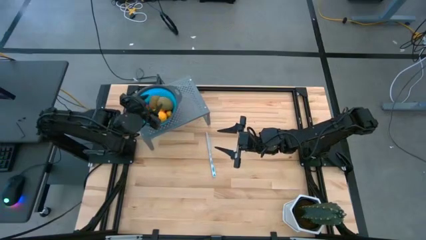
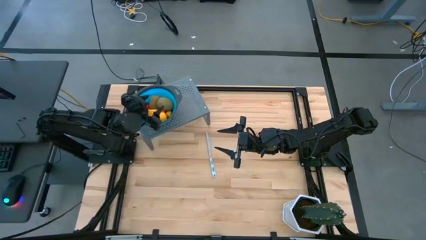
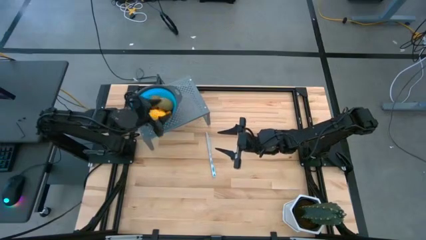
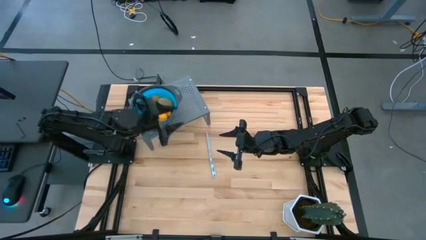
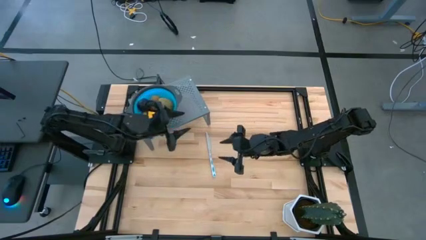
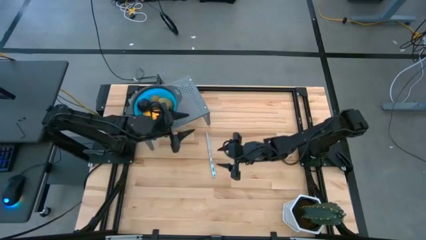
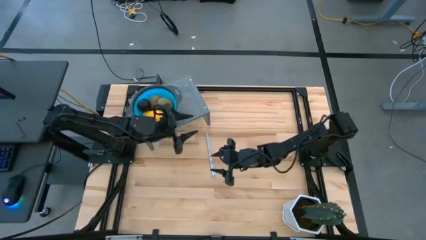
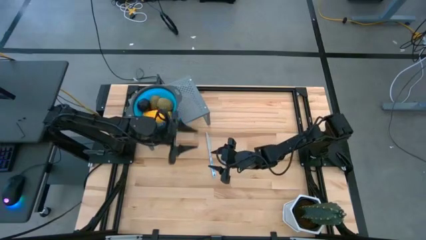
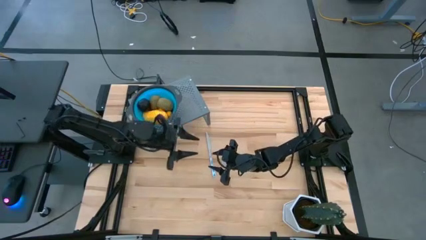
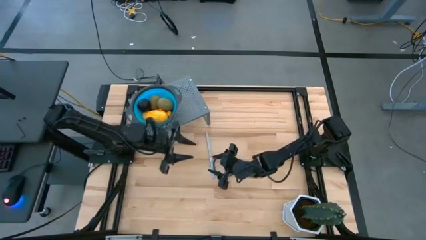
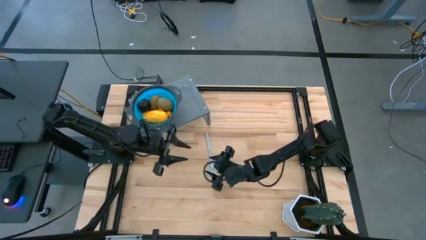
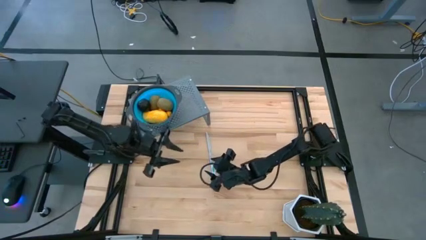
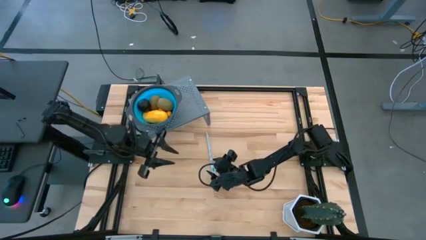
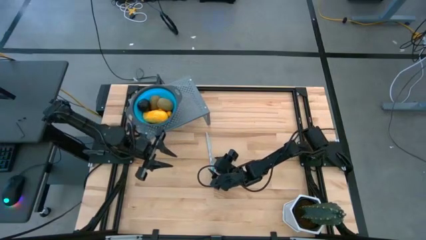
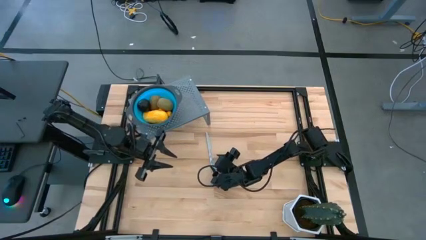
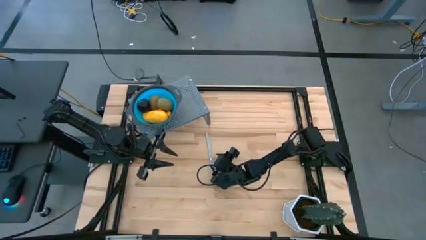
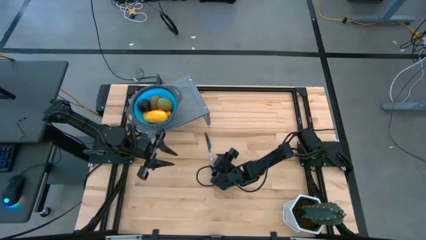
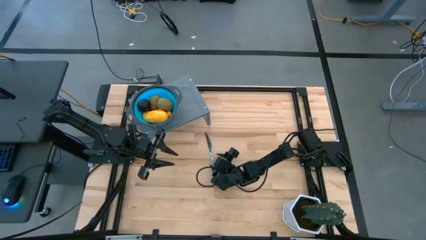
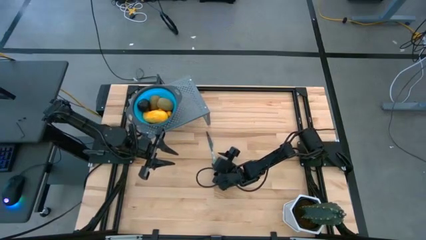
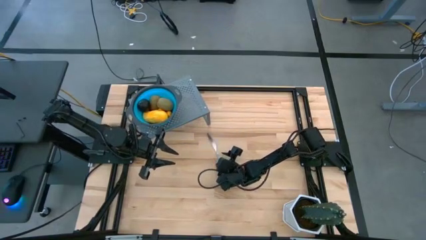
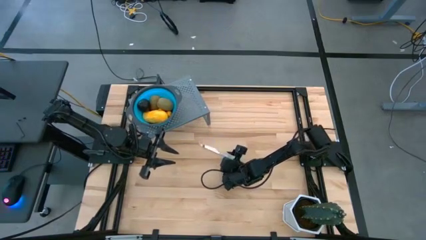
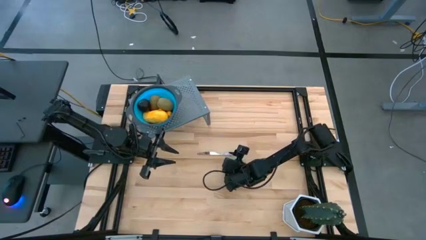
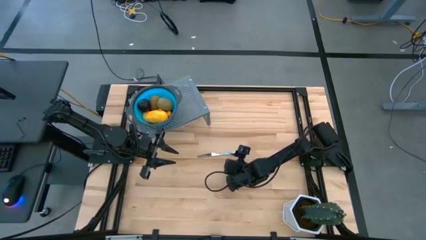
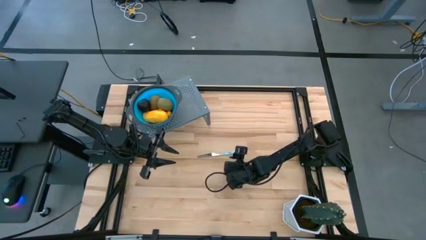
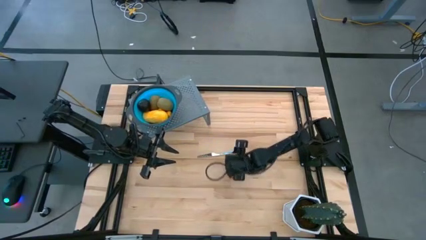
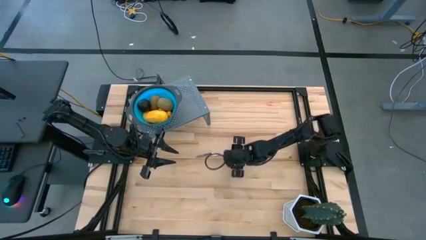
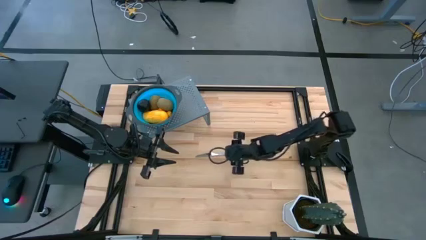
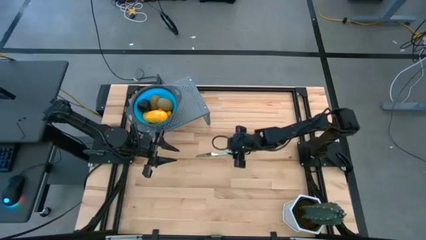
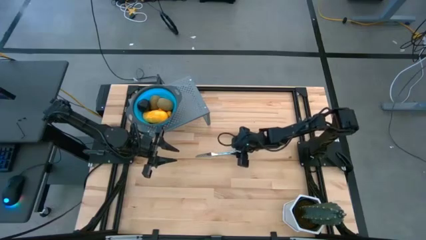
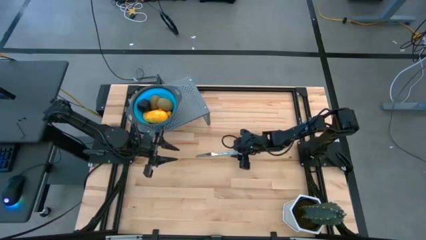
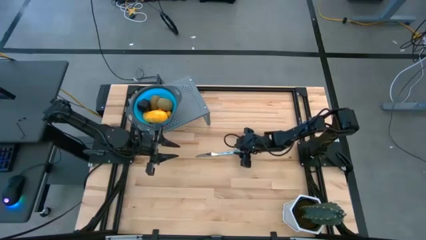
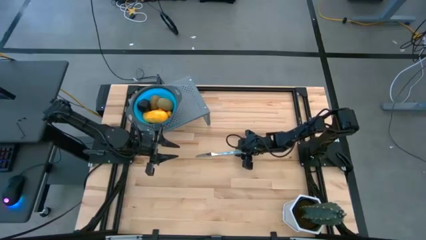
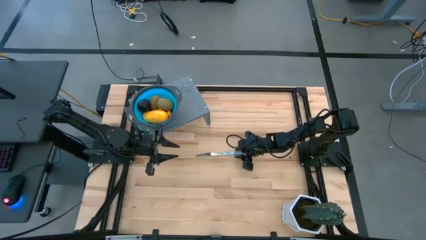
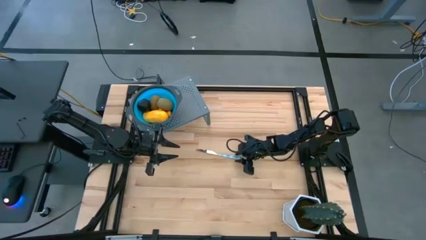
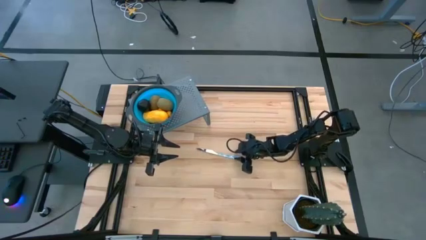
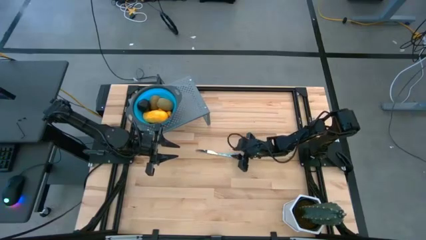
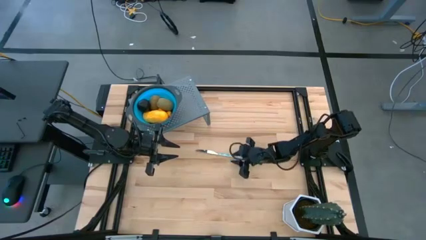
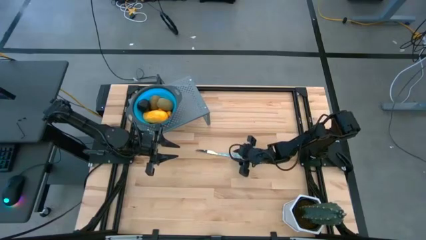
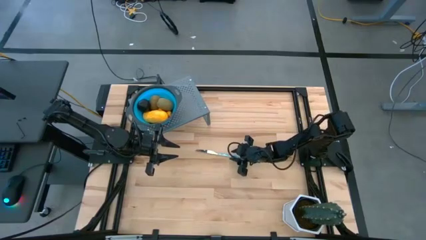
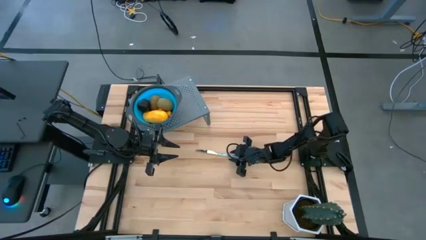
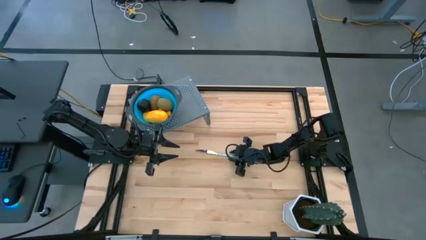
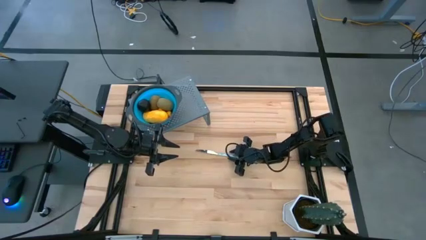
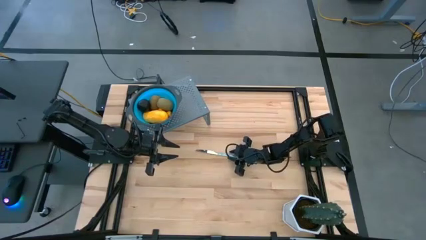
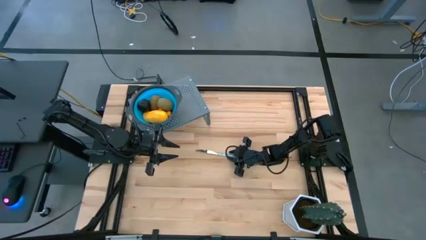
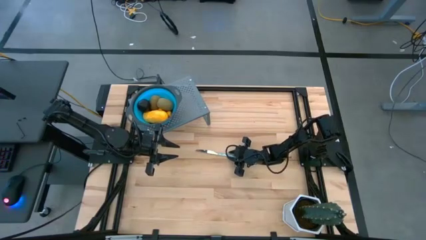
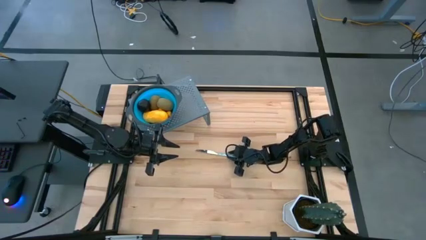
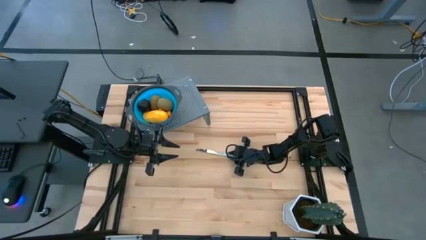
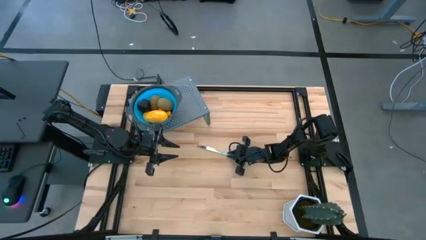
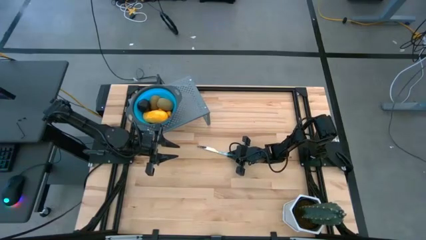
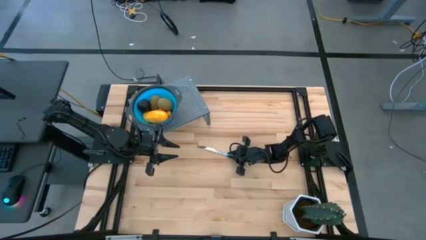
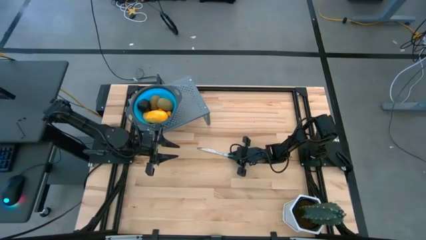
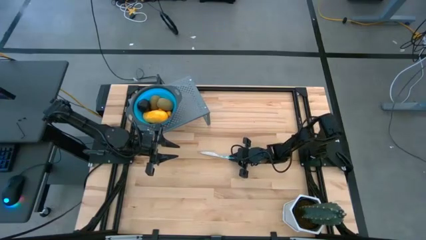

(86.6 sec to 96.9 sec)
Task: Pick & Place Fruit
Put the white knife on the shelf
